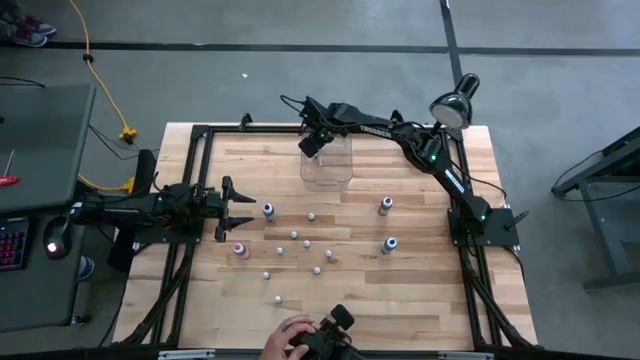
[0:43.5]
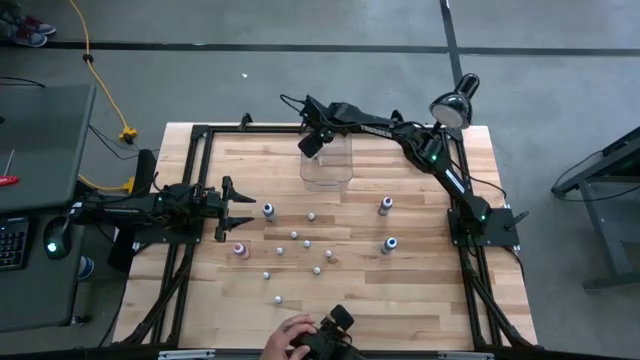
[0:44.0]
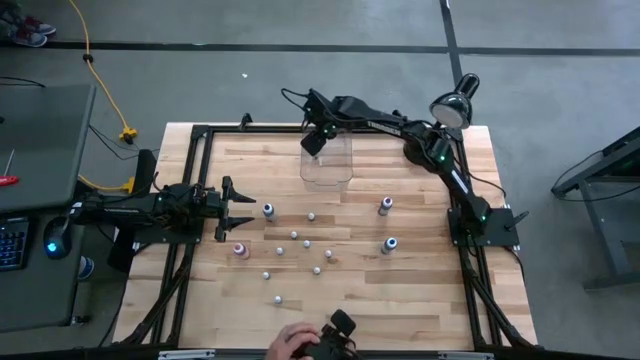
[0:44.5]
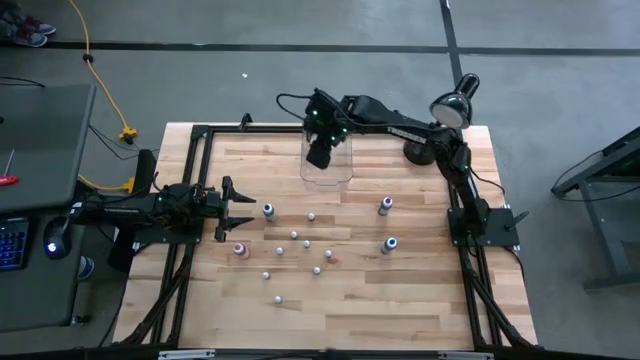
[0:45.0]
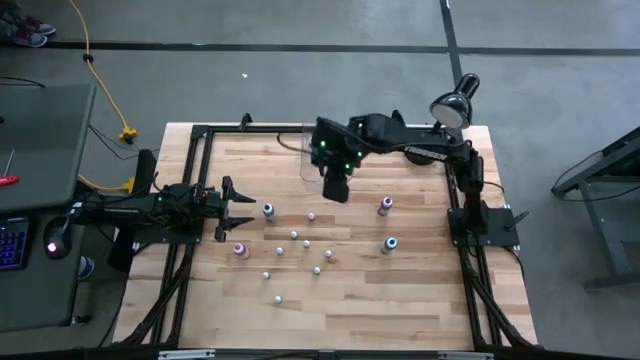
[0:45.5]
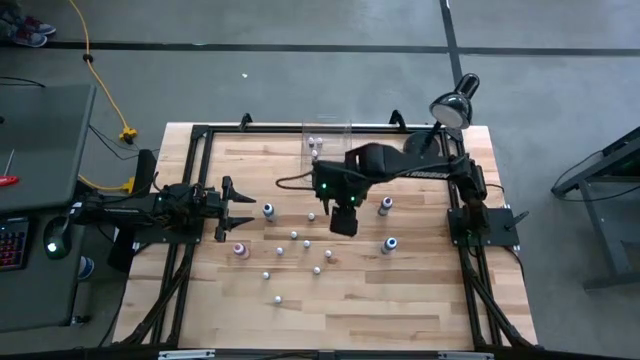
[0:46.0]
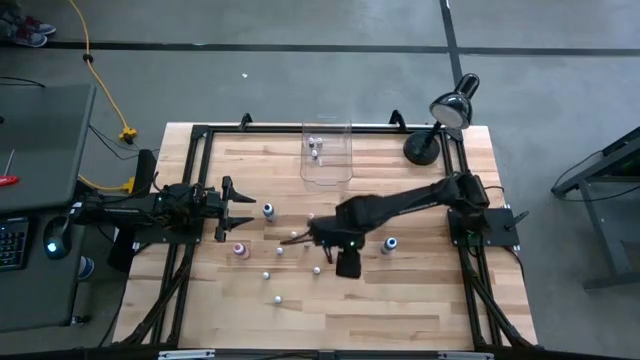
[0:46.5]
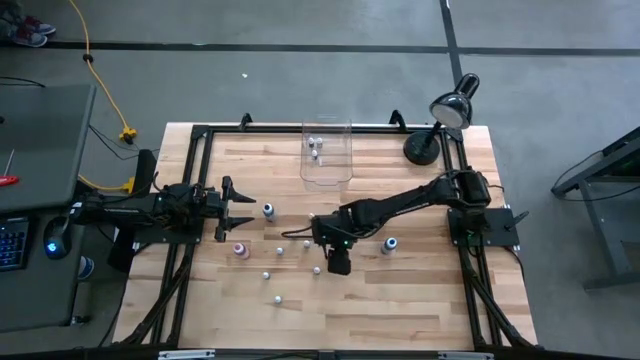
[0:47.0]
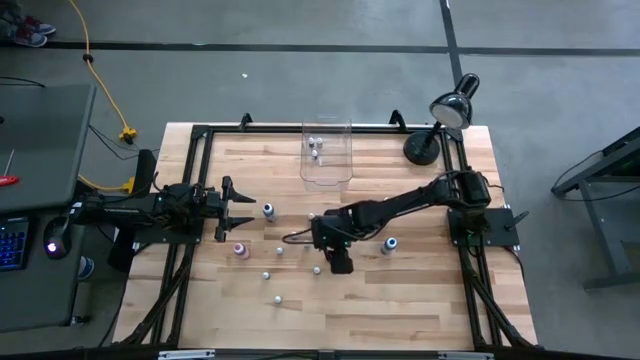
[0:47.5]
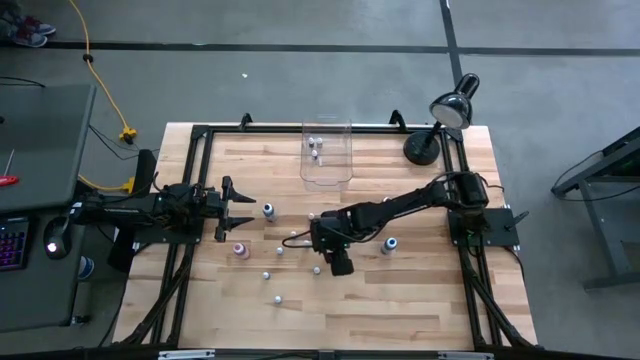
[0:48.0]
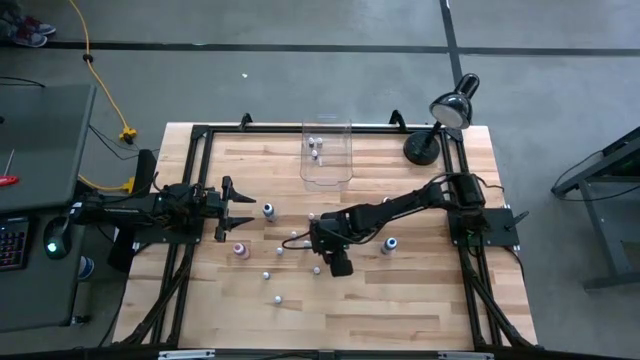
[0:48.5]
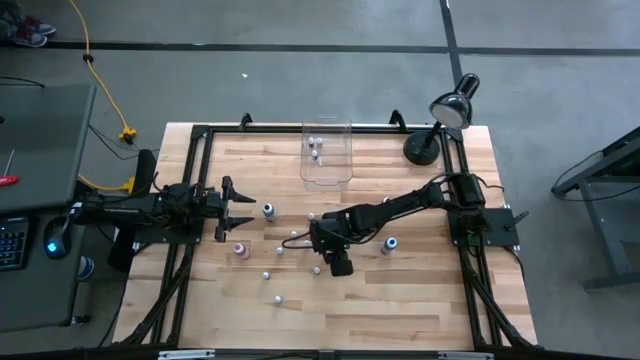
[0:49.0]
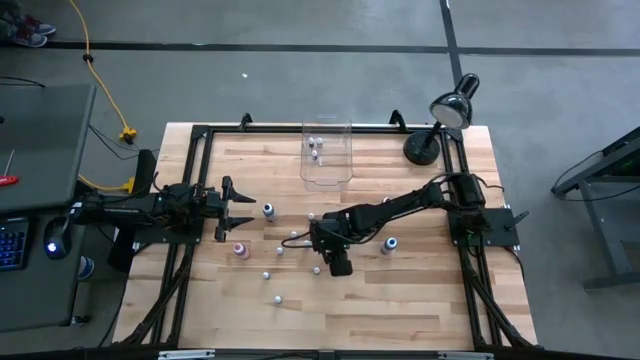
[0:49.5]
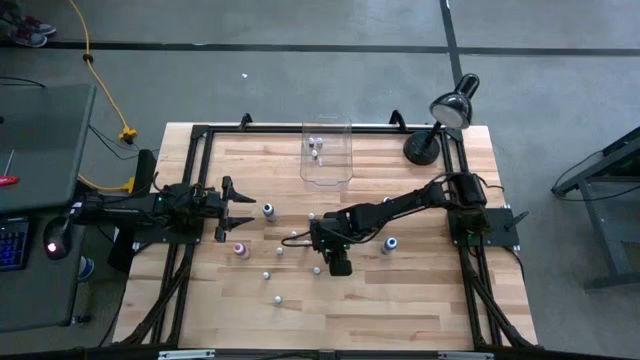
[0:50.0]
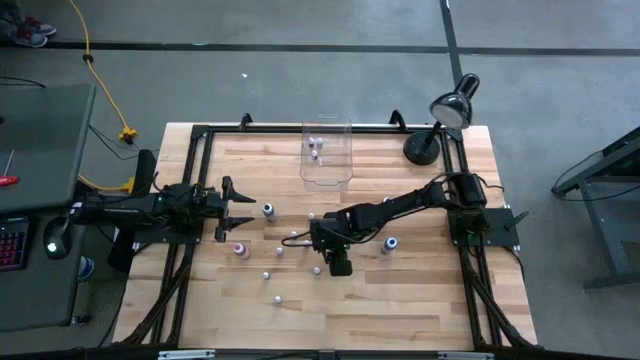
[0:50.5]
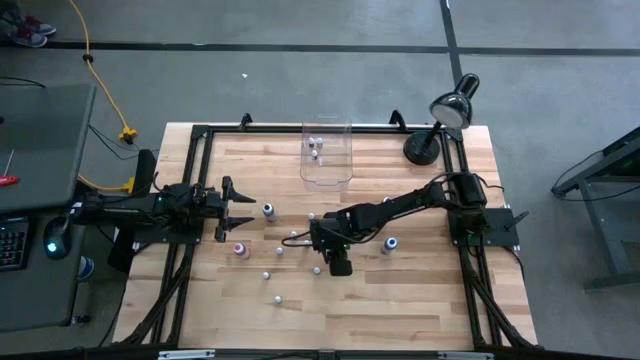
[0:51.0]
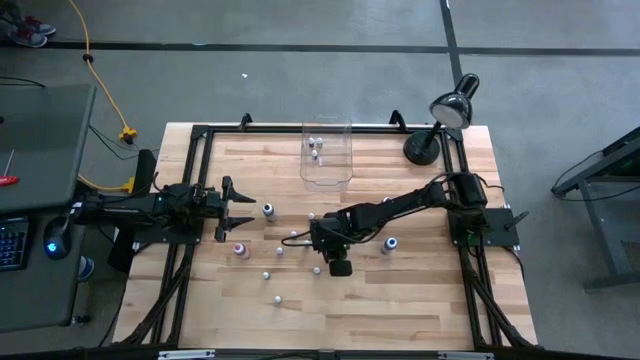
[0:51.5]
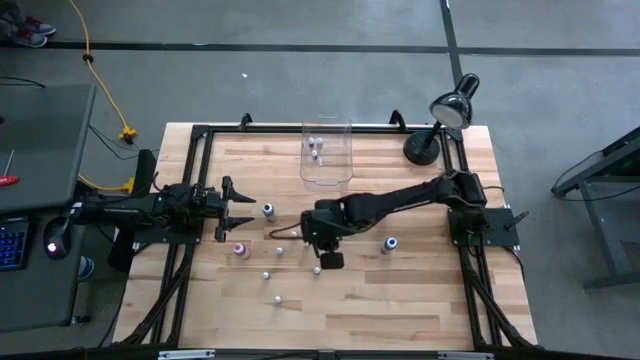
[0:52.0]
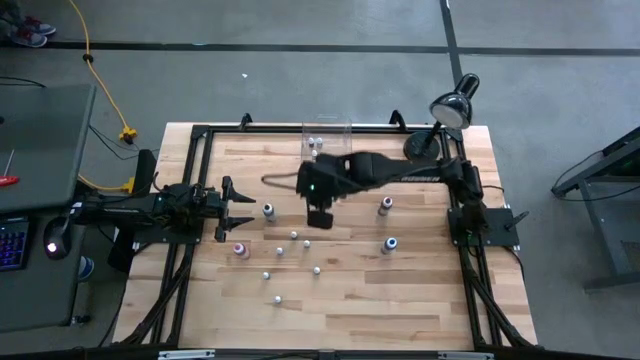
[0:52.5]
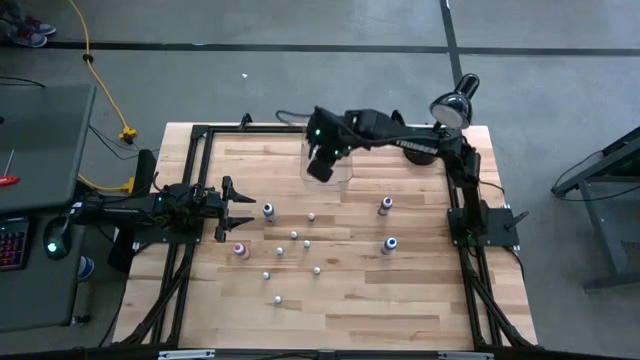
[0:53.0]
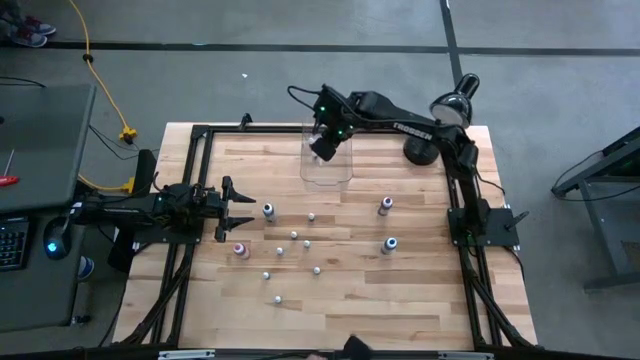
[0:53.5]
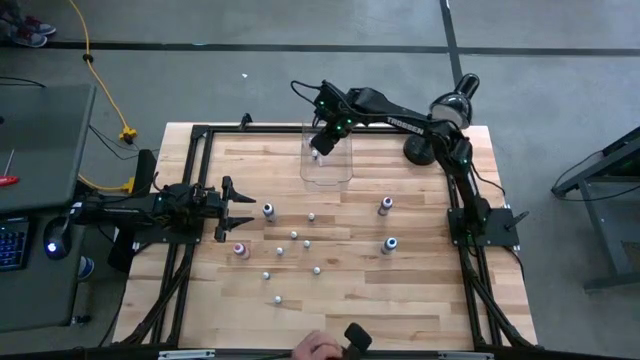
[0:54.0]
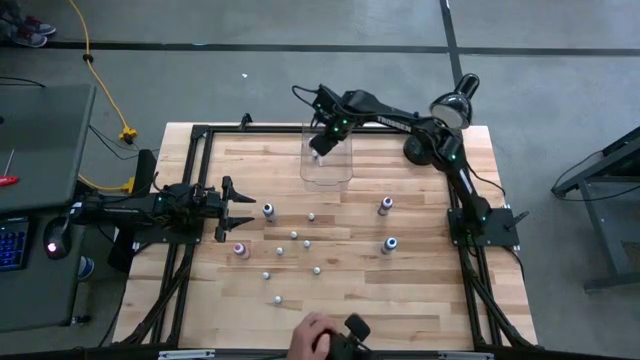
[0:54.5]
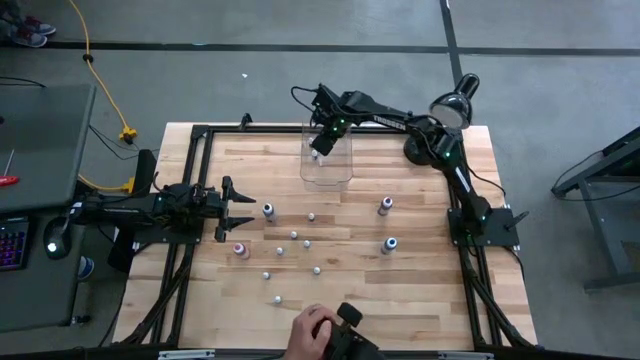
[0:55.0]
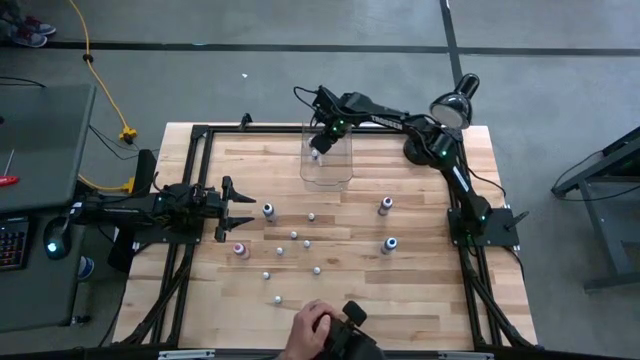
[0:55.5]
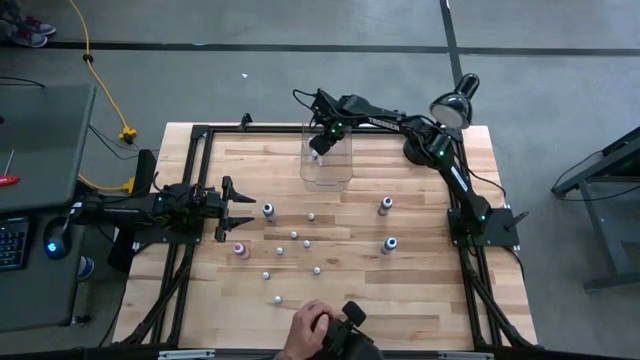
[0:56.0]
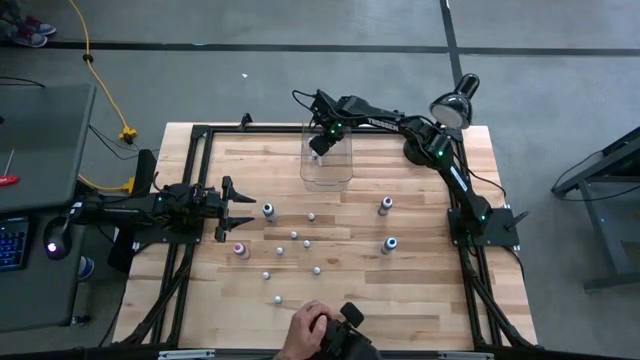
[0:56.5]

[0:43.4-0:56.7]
Task: Pick & Place food coloring
Put the small food coloring bottle into the transparent bin

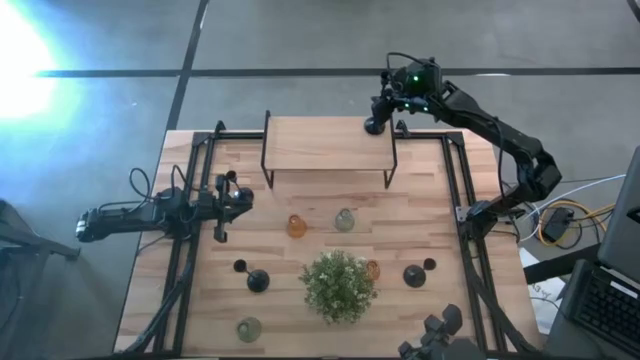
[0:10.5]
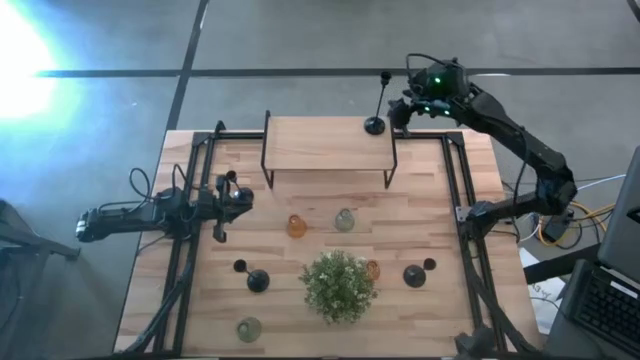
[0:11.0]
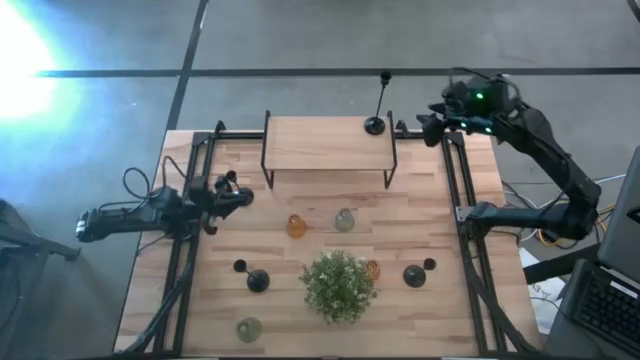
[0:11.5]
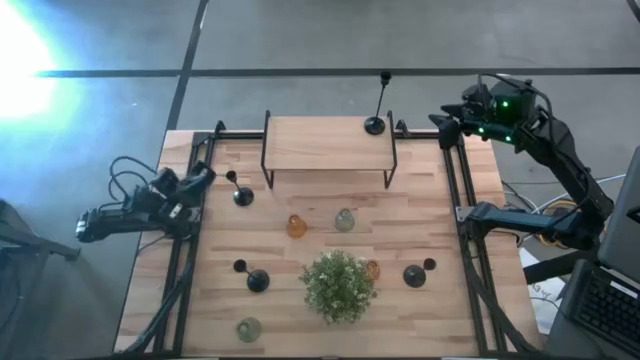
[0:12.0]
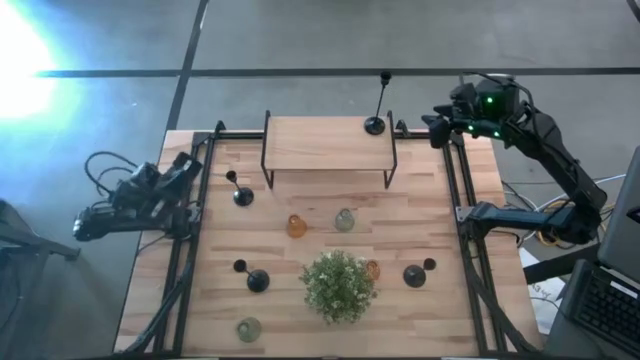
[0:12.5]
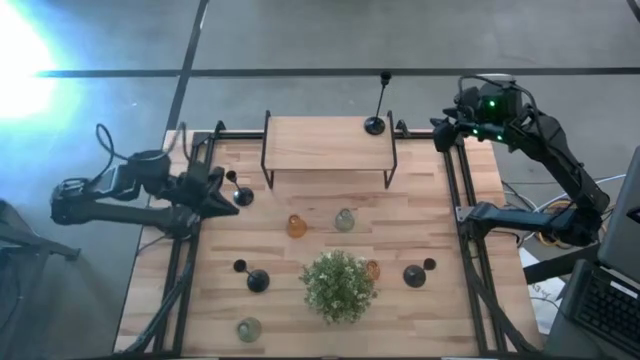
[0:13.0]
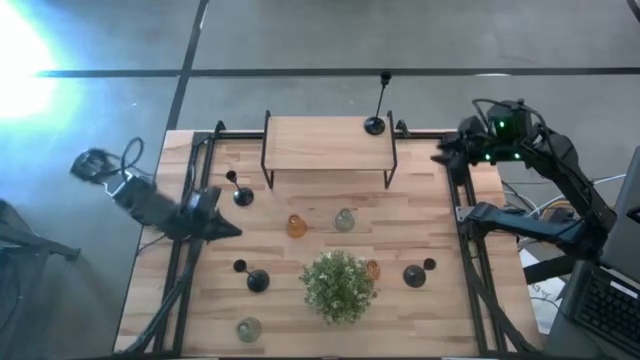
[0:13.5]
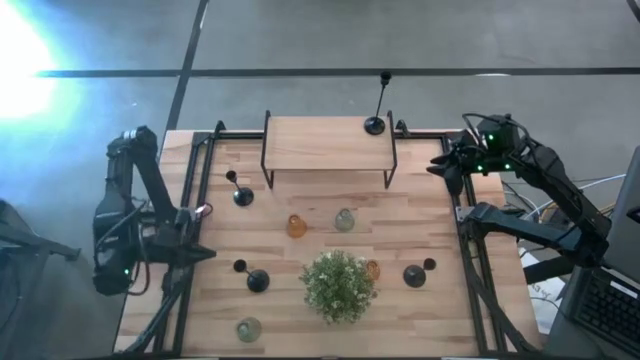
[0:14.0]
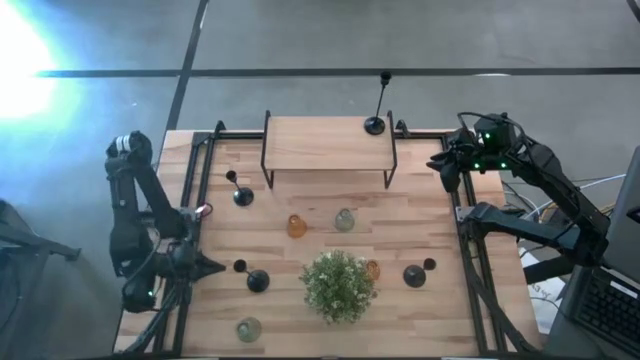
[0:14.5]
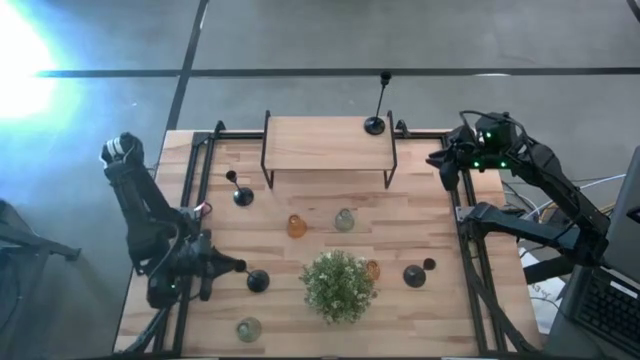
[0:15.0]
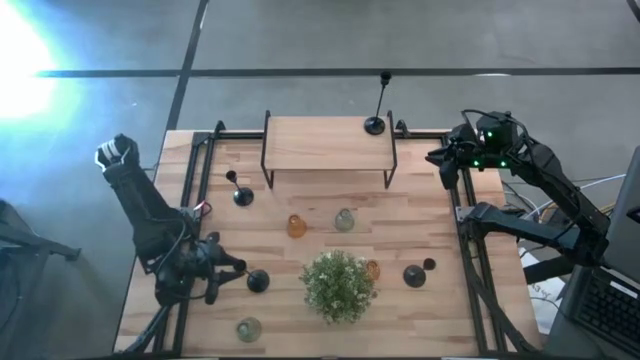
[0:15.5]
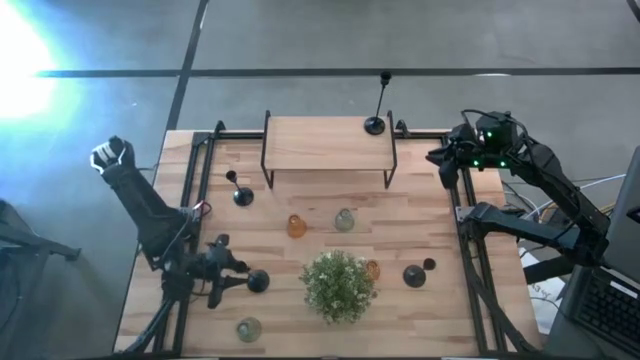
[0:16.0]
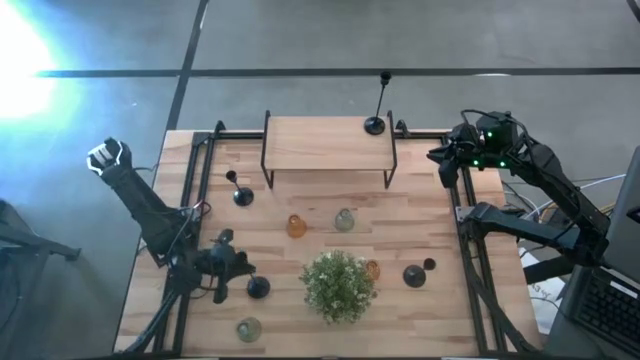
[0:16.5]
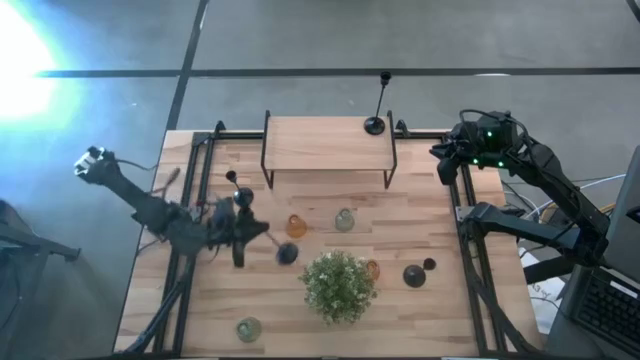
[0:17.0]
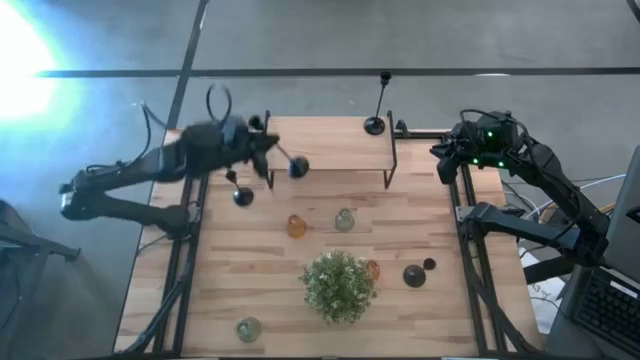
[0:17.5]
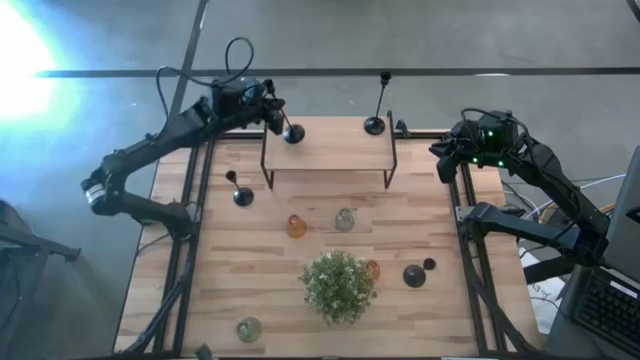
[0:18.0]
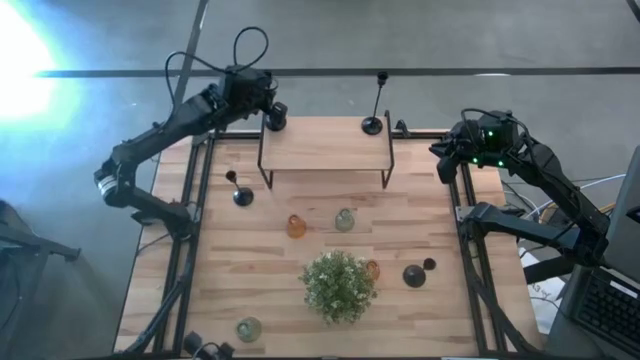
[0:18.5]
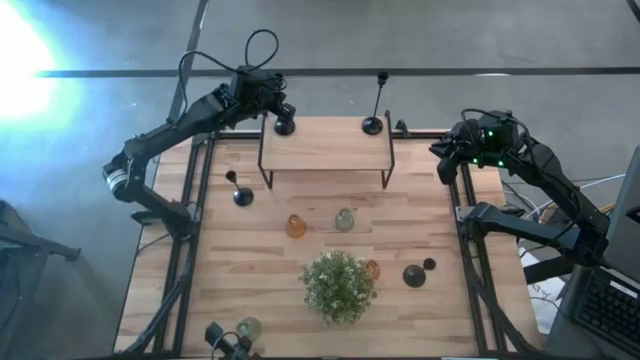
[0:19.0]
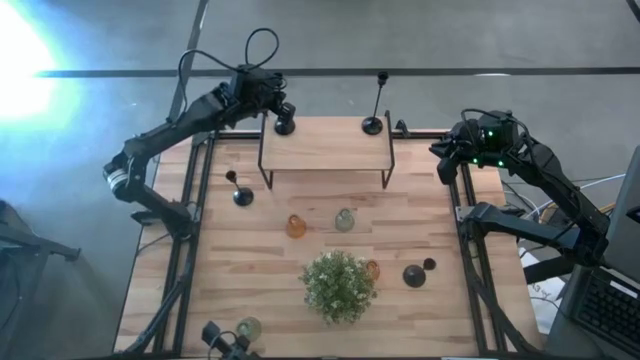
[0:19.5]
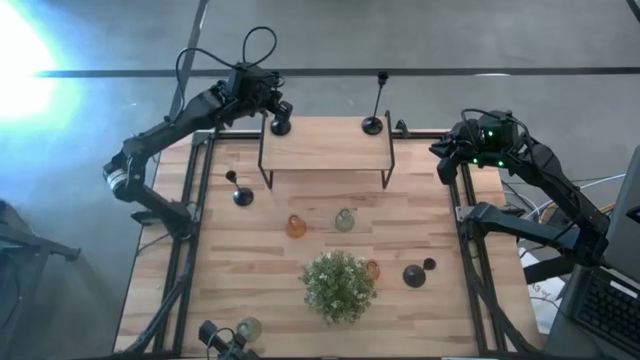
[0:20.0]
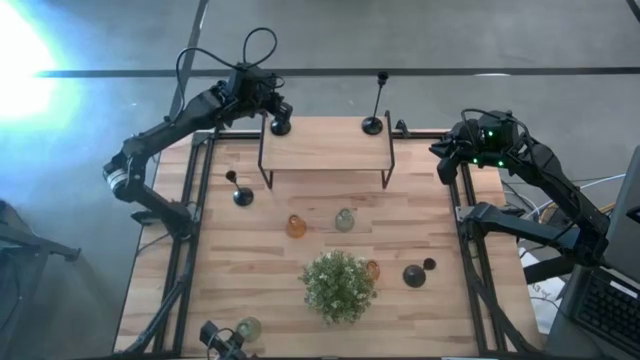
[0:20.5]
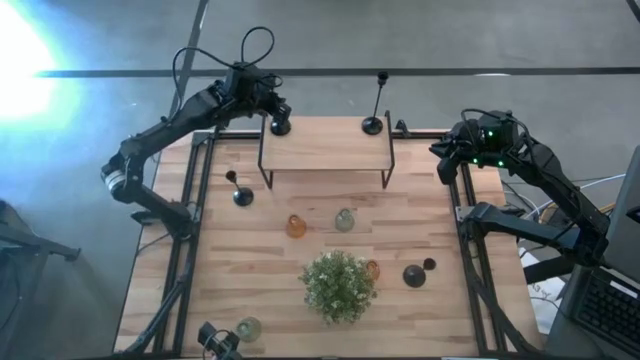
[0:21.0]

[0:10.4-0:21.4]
Task: Pick & Place candle stick holders
Put the large black candle holder on the shelf
